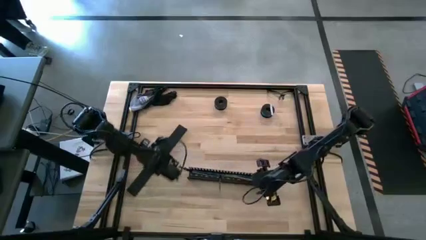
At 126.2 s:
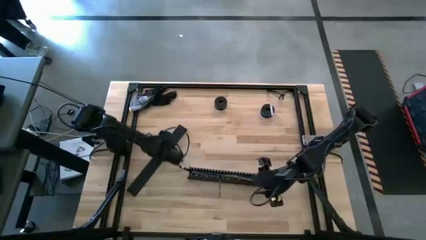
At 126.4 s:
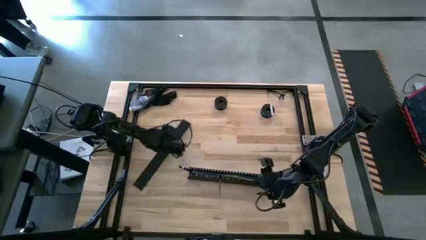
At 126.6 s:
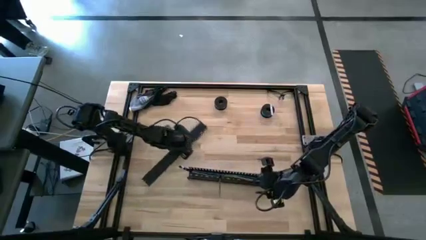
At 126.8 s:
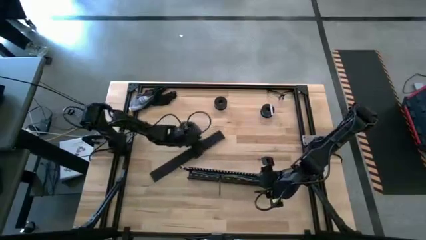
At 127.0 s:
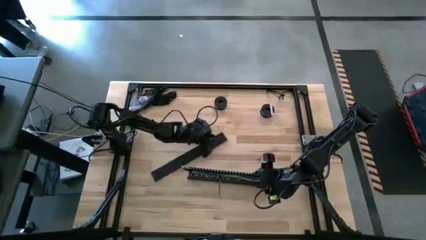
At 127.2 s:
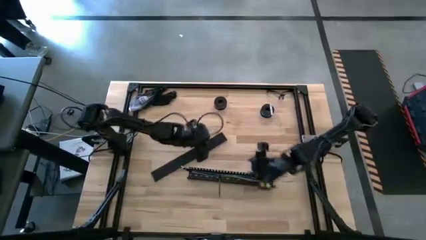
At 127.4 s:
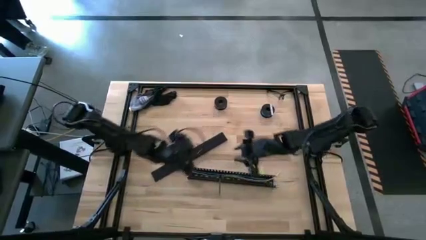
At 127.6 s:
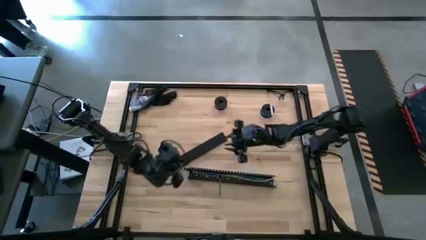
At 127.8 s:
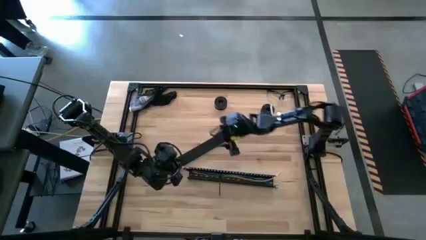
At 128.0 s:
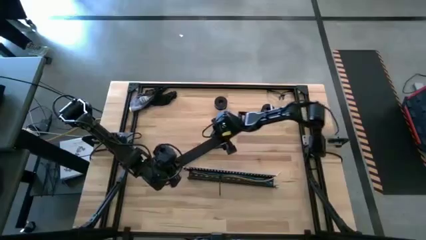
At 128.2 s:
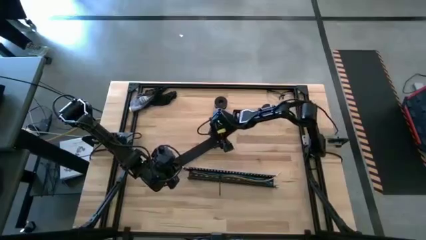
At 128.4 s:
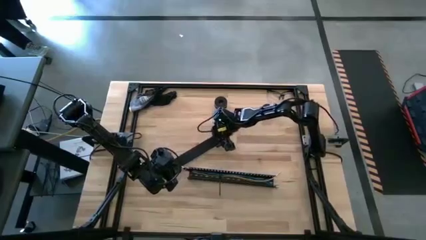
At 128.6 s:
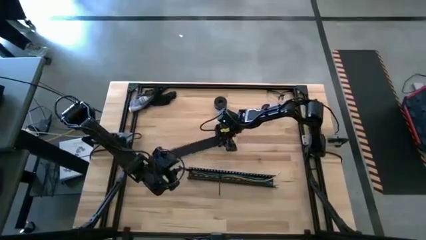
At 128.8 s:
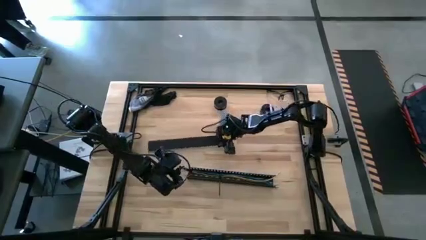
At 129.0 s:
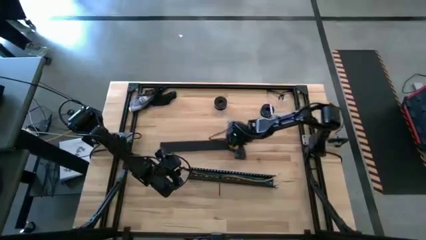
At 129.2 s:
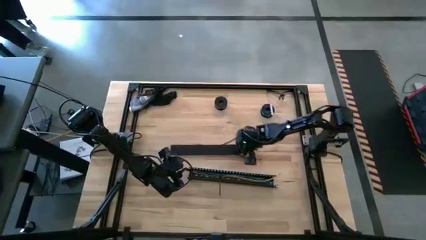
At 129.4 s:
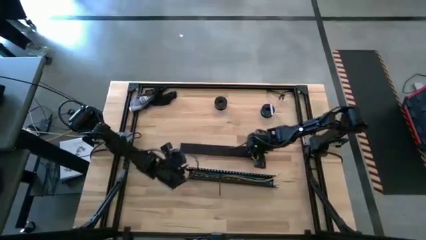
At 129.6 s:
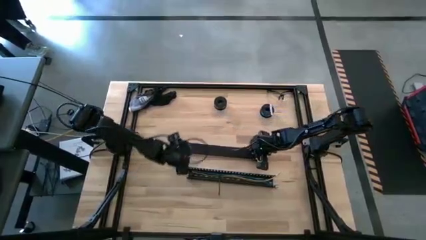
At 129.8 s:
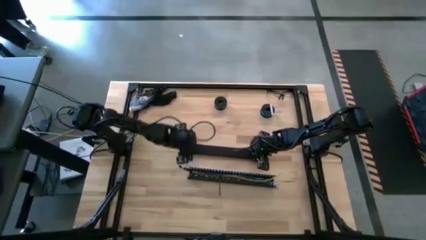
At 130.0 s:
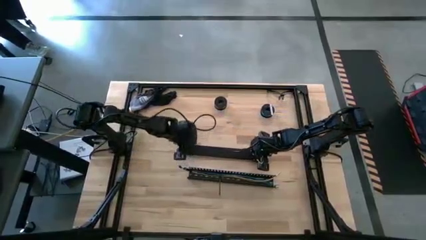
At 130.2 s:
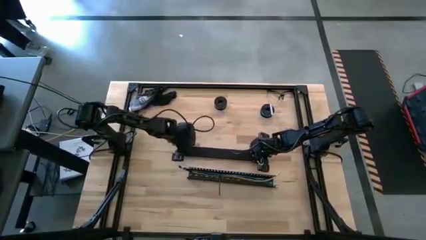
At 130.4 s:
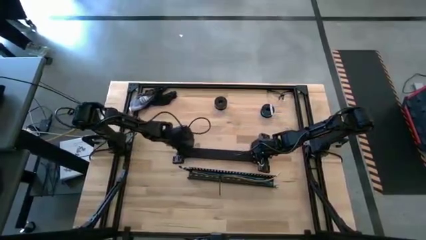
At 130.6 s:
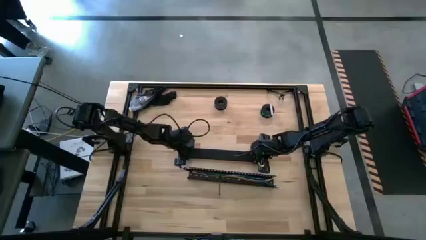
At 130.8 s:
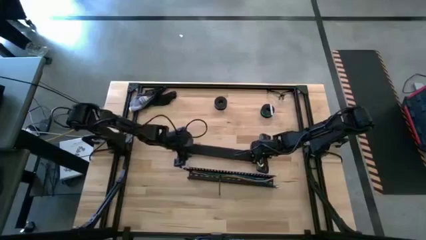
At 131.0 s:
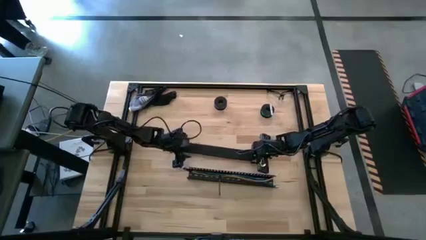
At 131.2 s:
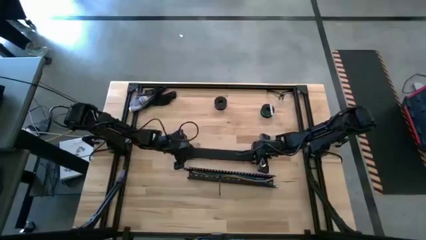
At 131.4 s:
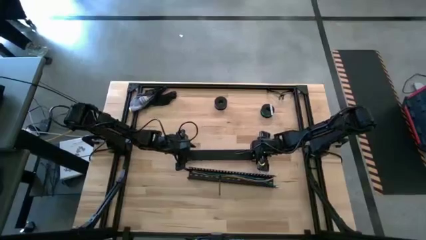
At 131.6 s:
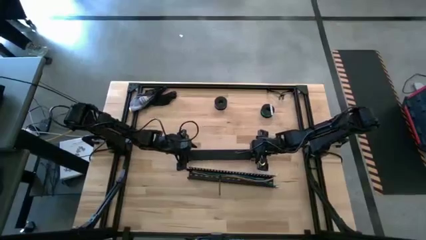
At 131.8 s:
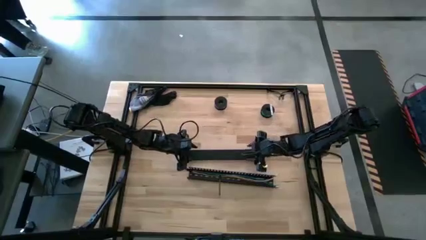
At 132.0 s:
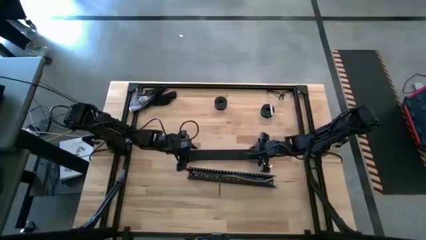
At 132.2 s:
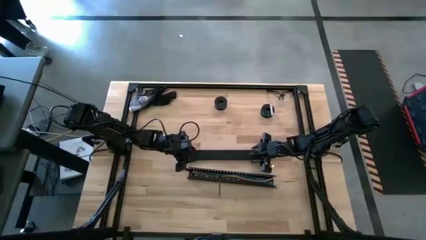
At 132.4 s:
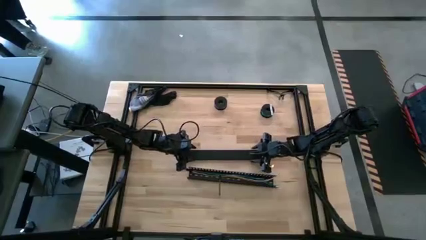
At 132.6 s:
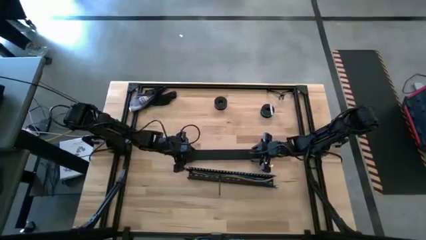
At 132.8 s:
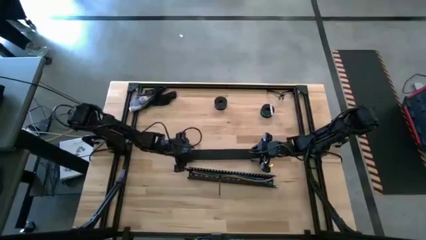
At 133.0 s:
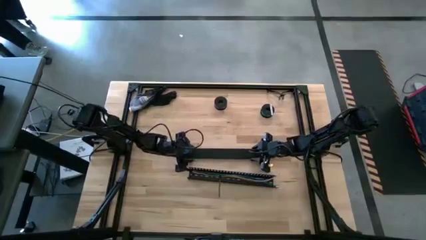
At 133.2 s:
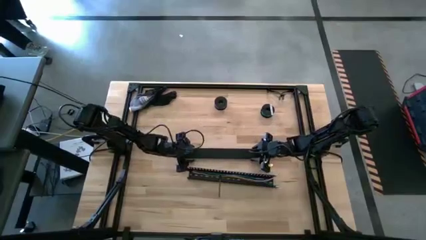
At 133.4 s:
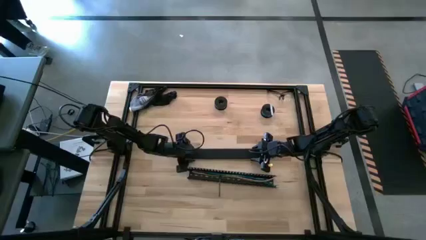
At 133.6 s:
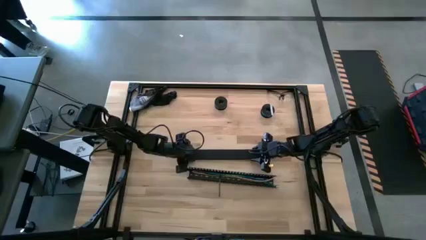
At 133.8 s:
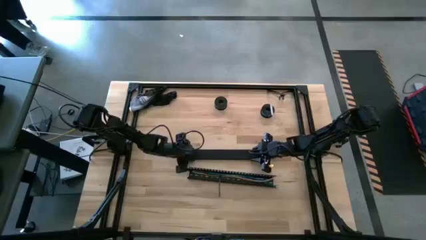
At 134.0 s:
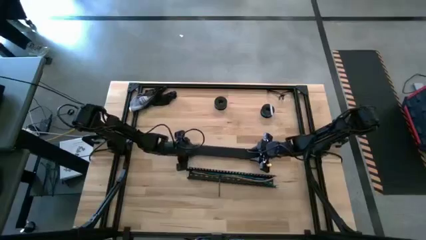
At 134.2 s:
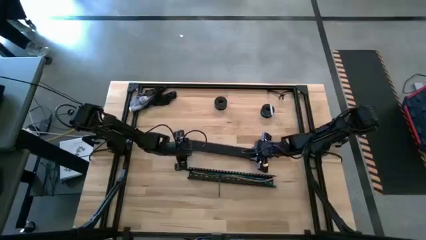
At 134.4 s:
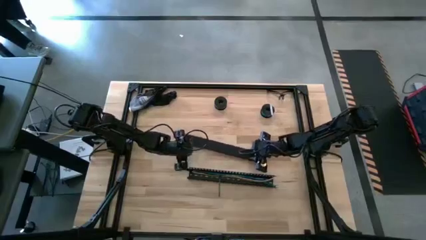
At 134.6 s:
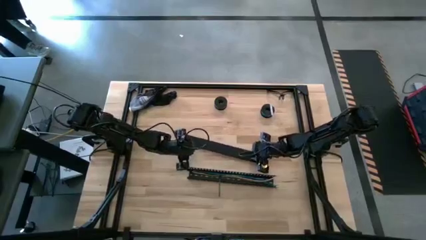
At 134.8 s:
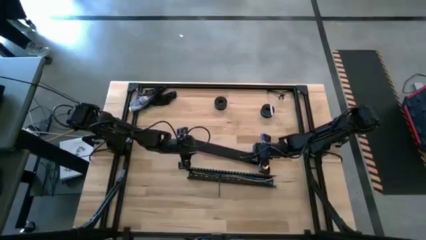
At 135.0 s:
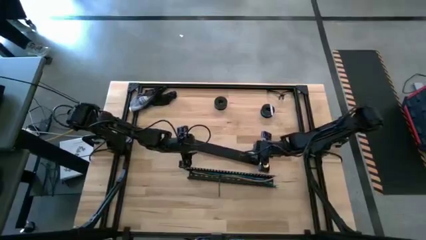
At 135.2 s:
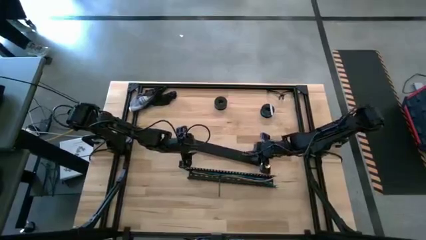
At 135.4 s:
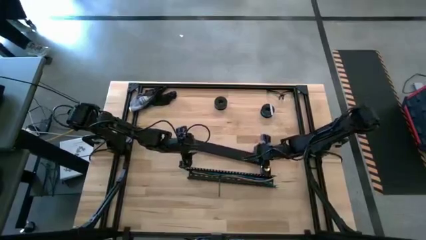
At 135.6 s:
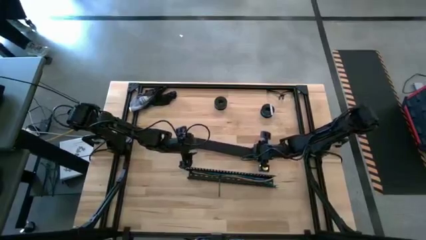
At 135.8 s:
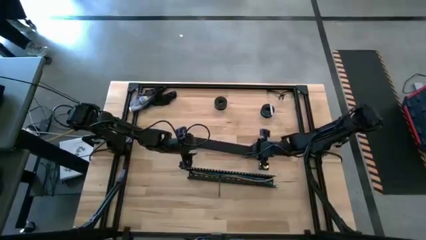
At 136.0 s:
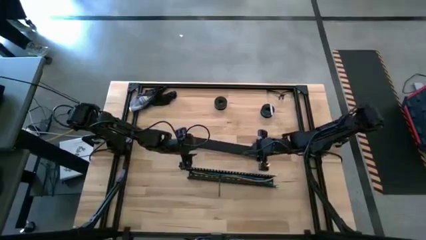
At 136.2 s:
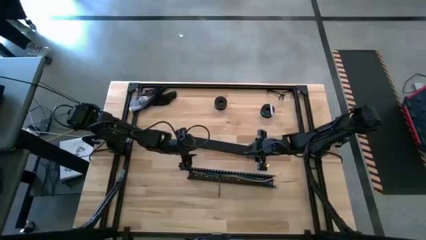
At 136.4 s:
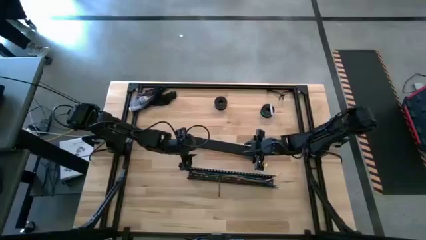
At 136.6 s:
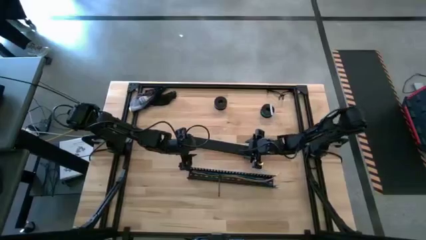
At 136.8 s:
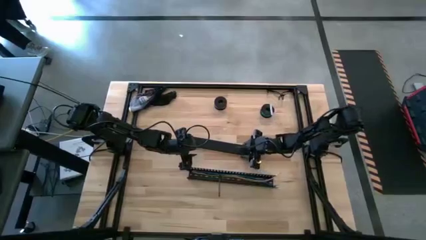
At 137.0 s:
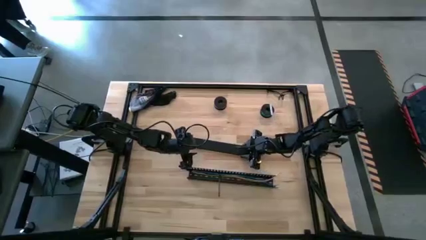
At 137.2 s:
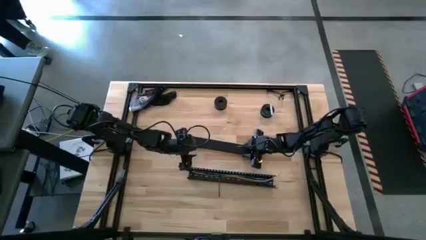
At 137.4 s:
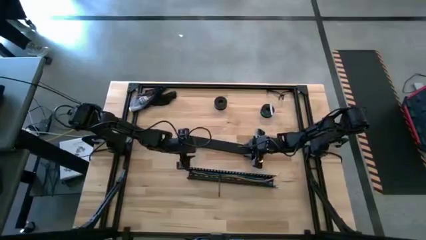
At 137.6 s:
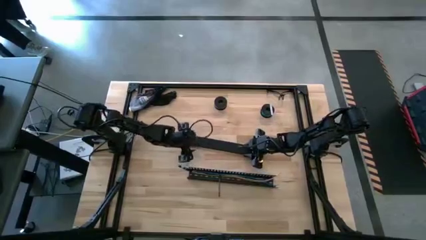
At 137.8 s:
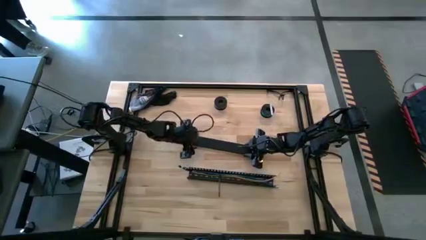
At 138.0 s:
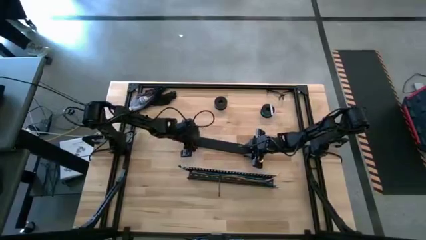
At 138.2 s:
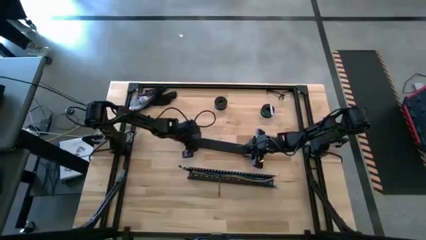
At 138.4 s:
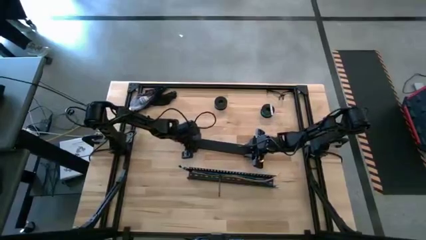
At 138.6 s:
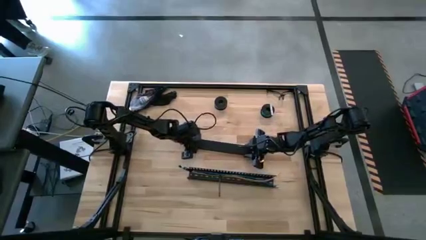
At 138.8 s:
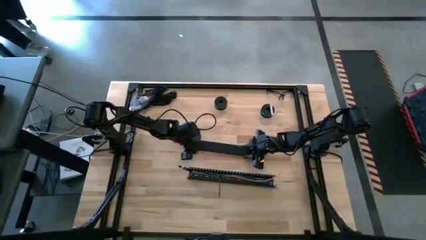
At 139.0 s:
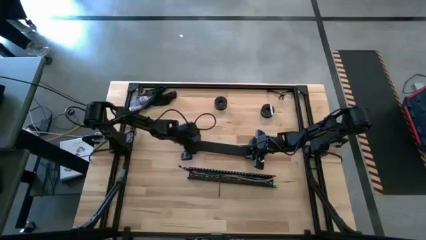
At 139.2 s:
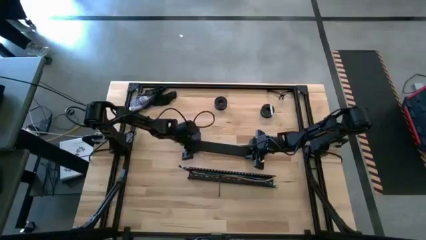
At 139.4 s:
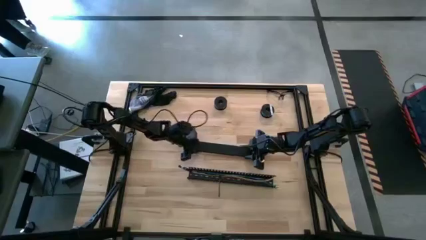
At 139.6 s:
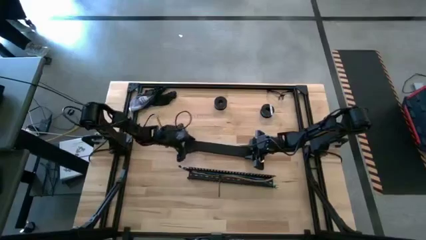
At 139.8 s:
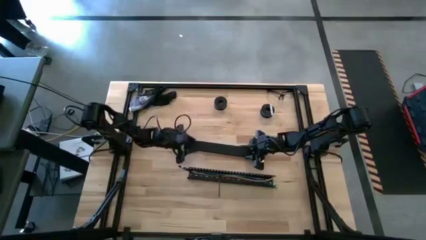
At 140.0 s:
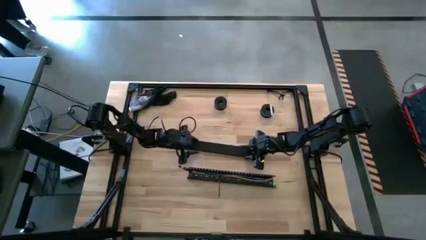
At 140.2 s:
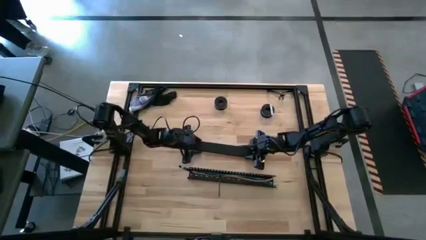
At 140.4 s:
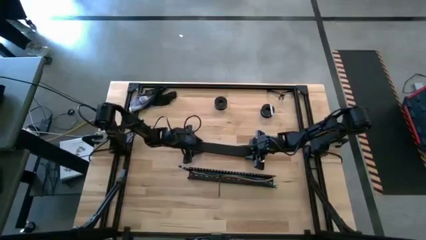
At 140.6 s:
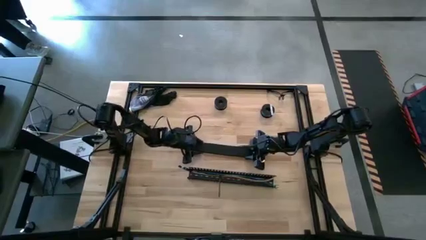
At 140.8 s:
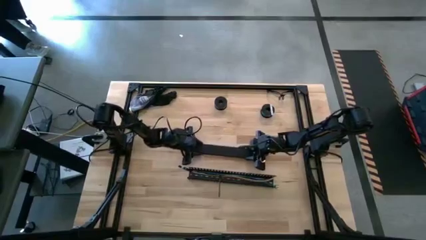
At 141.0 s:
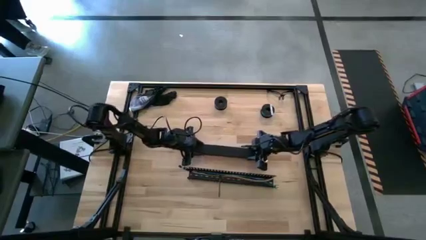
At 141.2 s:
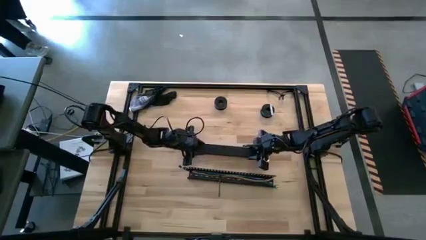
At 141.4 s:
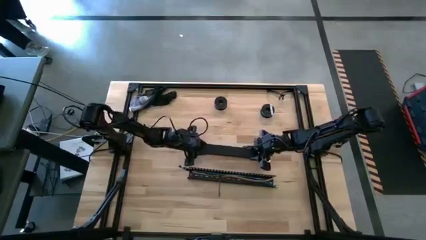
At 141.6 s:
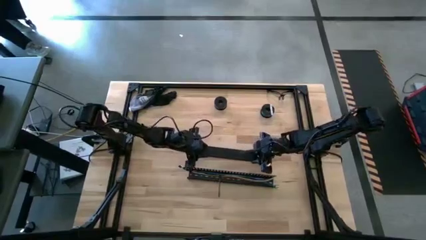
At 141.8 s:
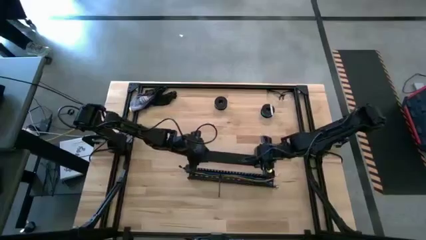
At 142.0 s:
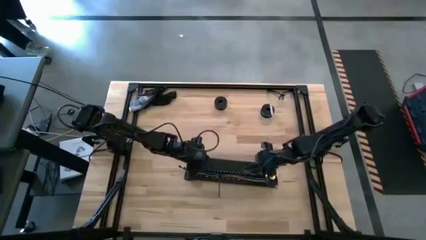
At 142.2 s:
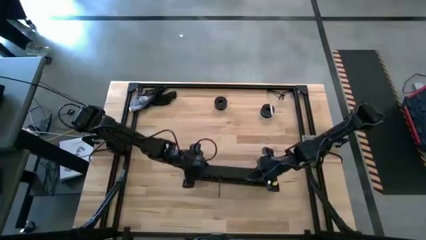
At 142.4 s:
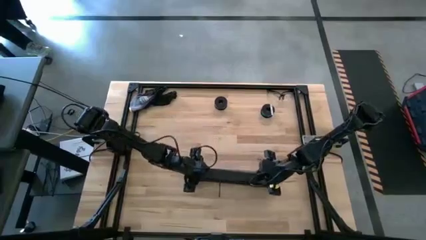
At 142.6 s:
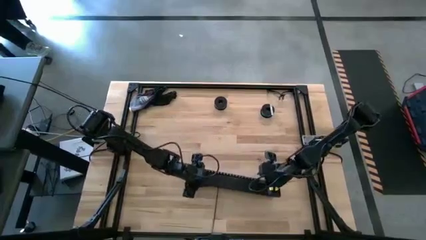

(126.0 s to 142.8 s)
Task: Ziptie cables
Close the black cable duct
